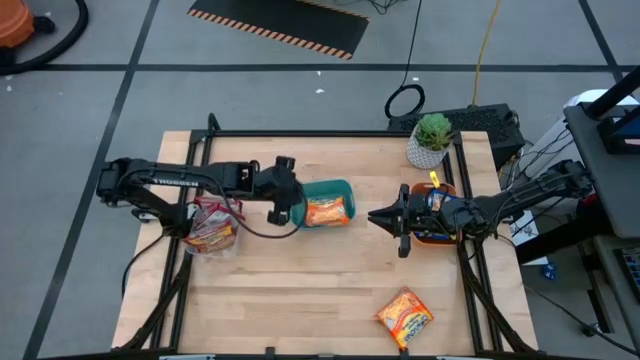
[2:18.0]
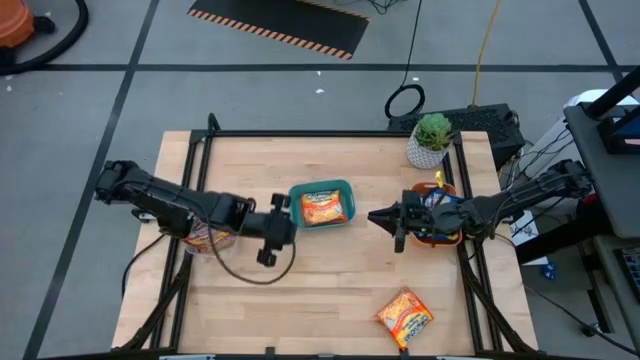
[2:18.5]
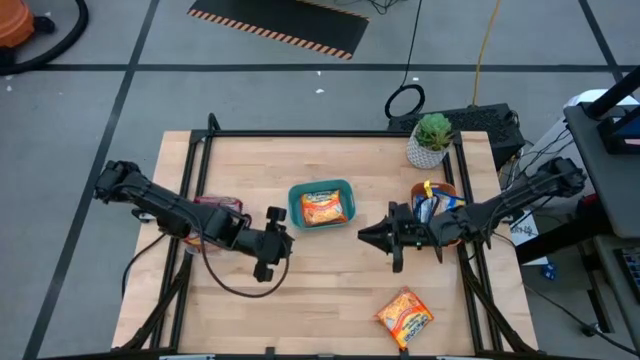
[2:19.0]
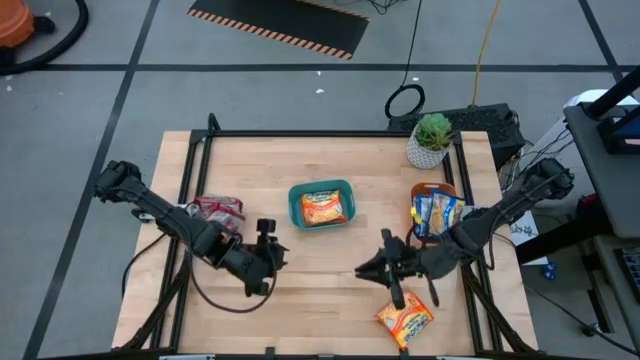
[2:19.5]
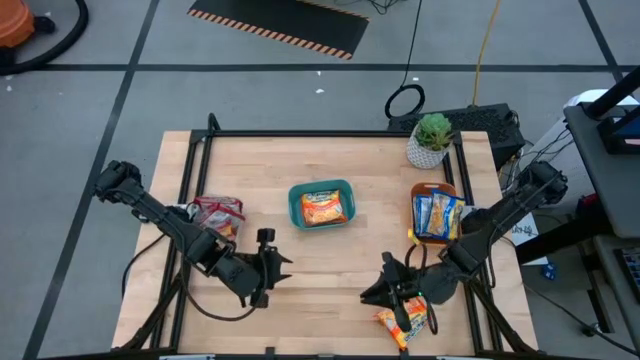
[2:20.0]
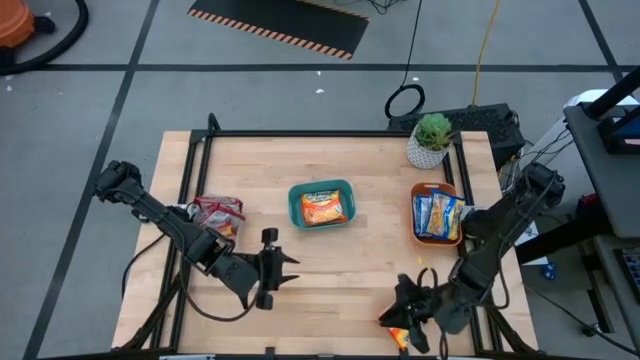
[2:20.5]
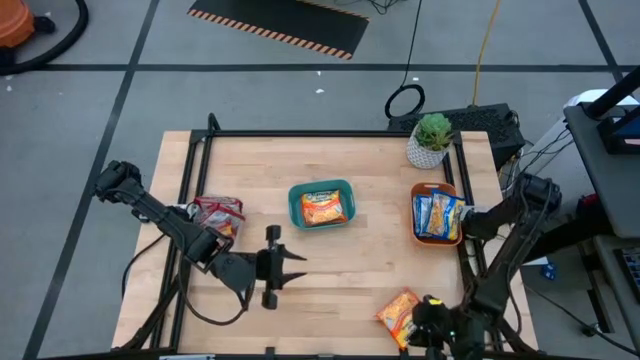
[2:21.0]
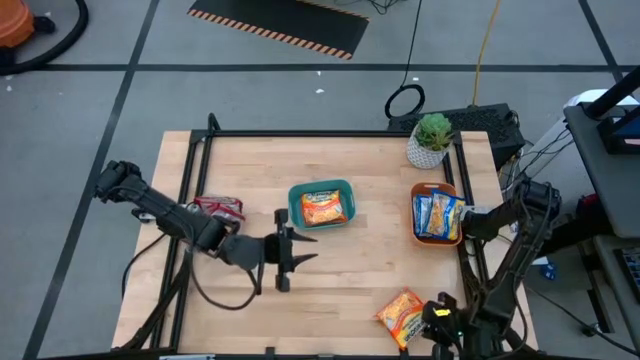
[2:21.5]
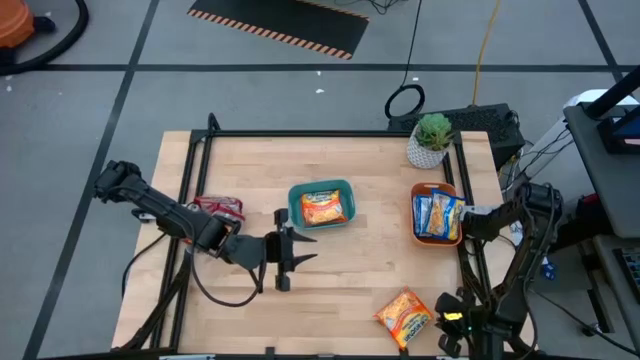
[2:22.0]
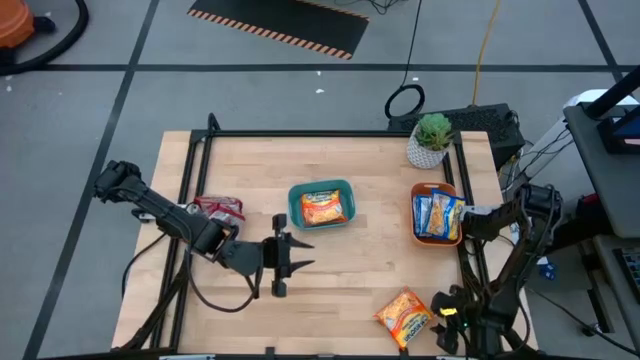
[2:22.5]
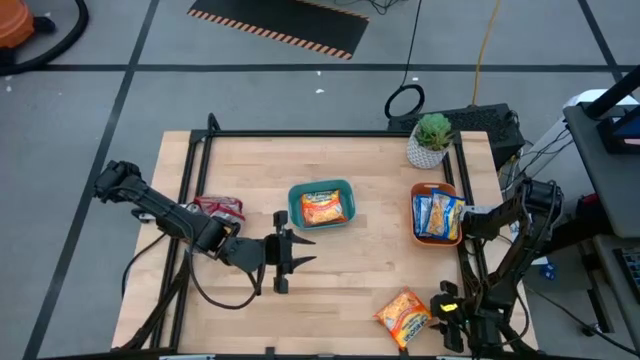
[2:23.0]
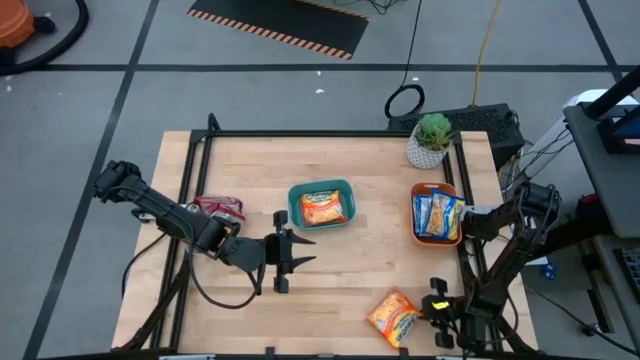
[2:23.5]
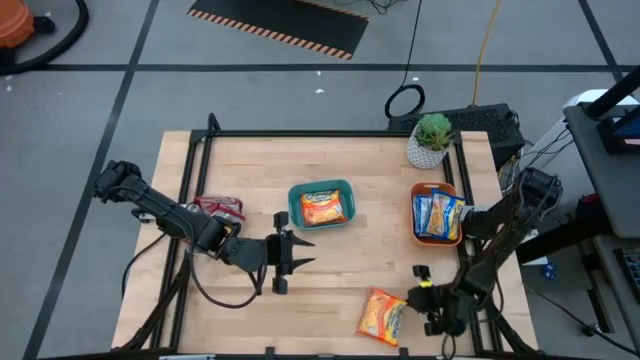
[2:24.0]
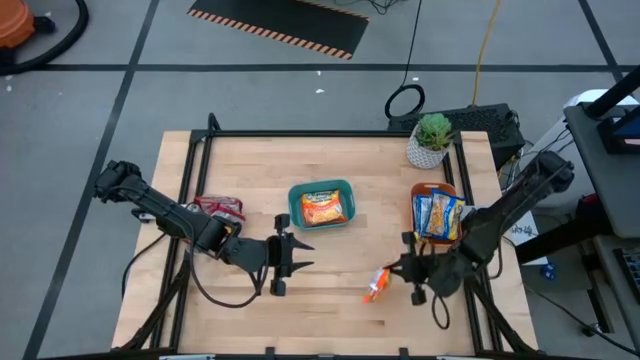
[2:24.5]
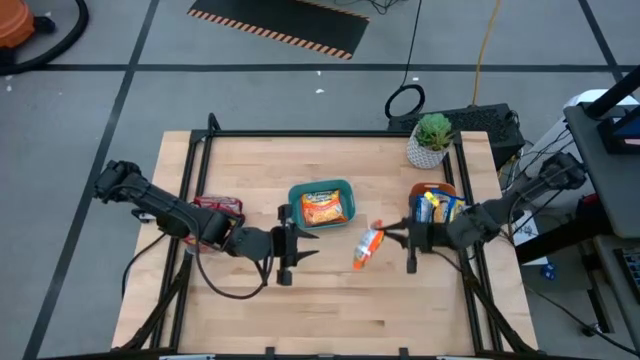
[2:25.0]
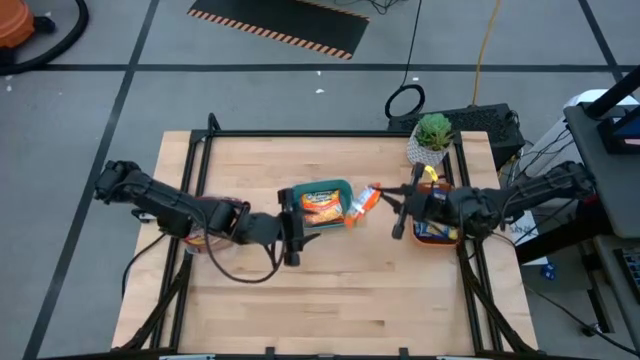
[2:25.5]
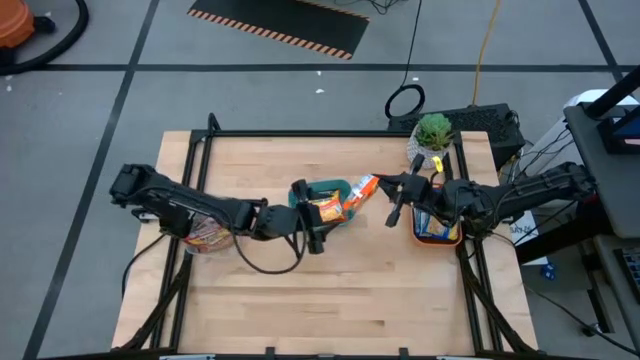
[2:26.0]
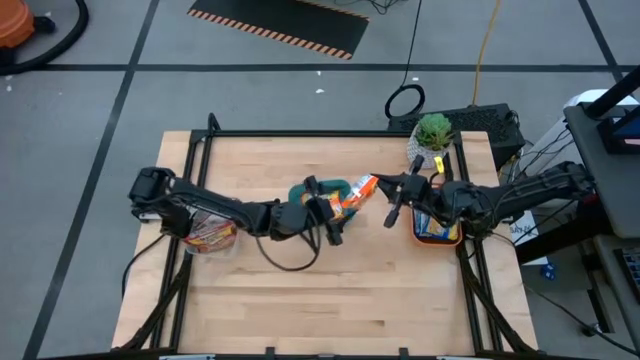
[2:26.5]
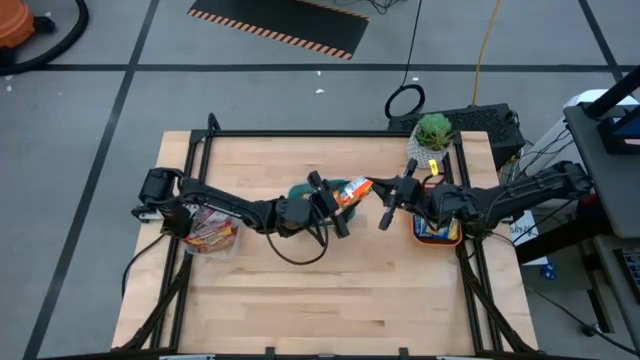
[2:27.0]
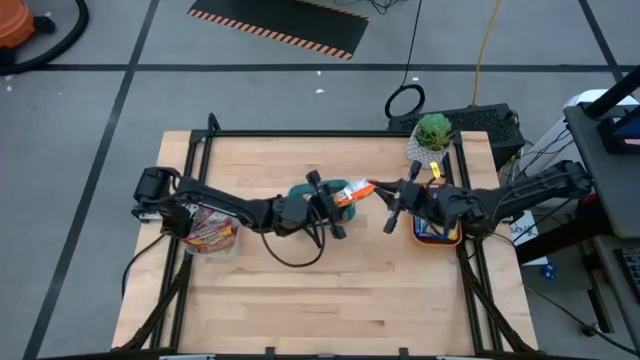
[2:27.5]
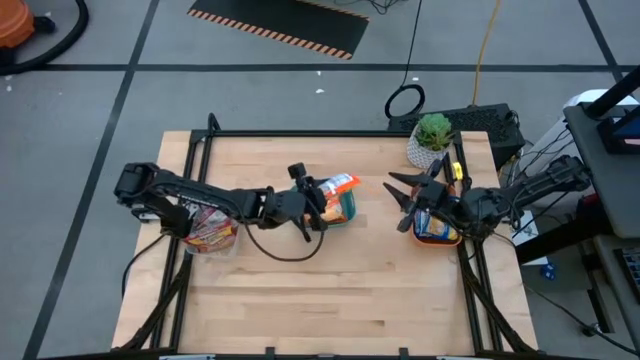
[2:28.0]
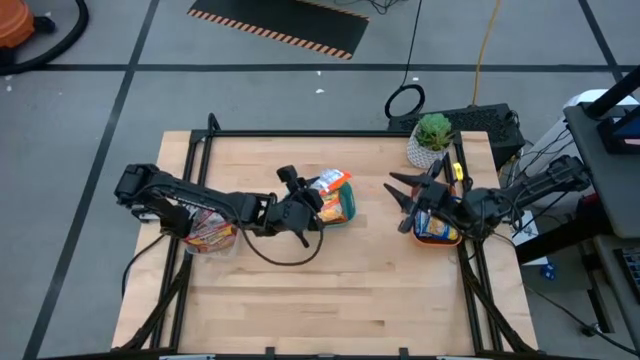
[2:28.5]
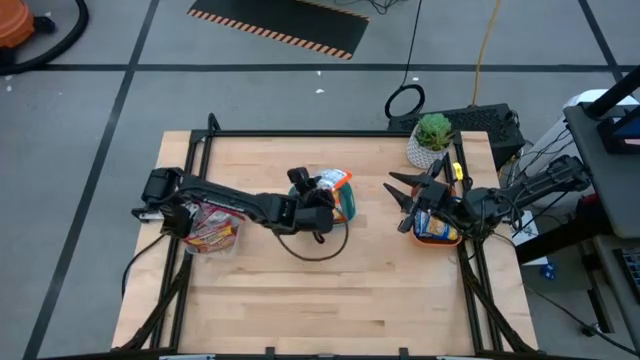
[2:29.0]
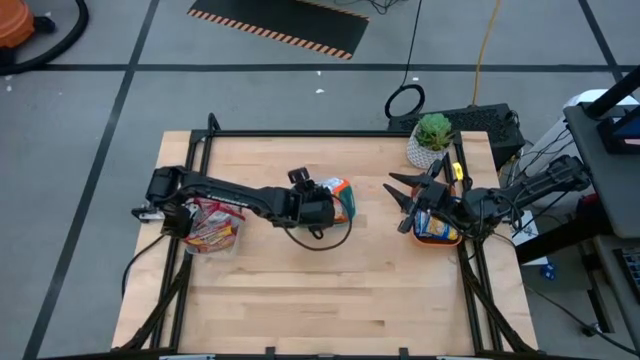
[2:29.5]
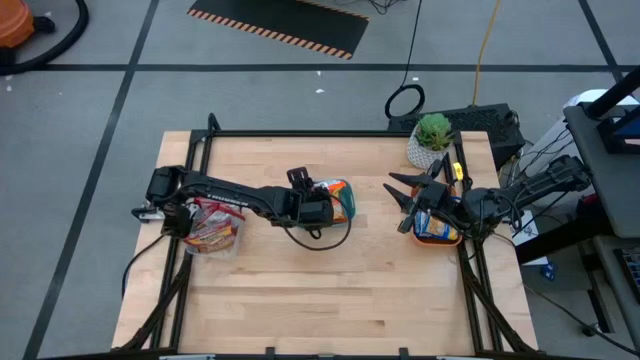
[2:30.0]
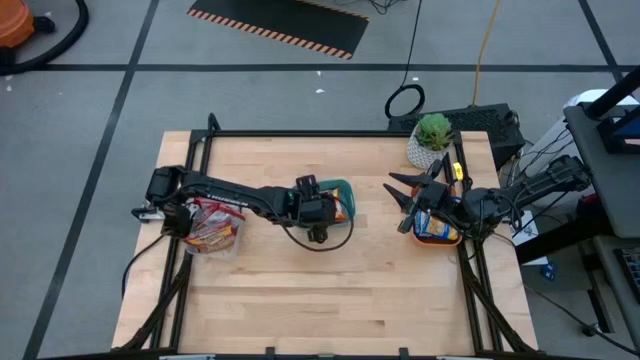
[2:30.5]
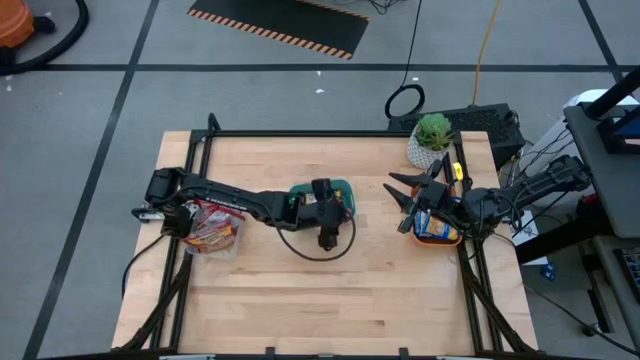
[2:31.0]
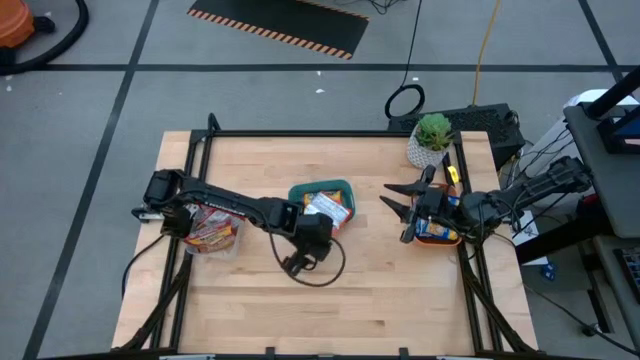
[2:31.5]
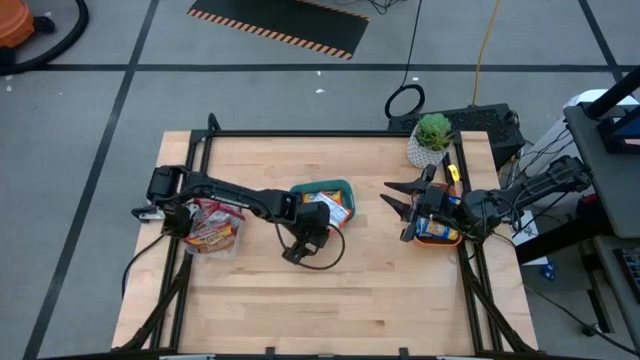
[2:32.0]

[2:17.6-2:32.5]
Task: Sort Maruchan noodles
Put the orange noodle pack into the green bin

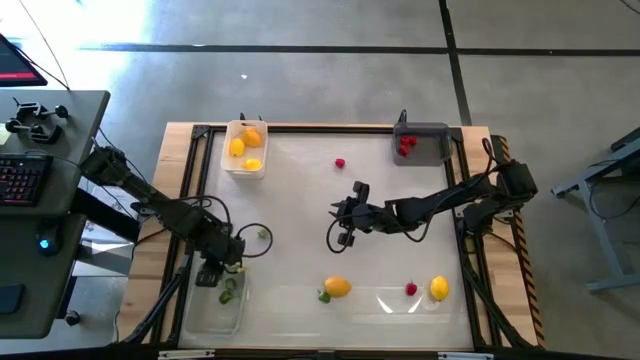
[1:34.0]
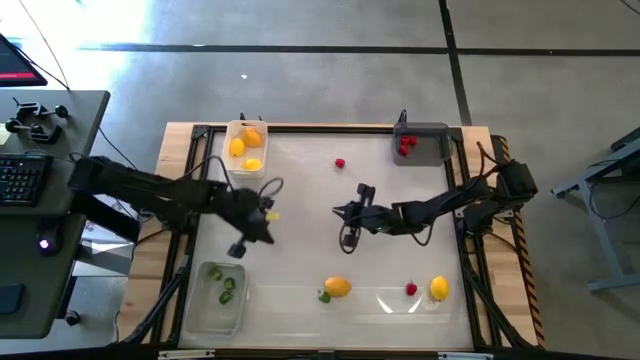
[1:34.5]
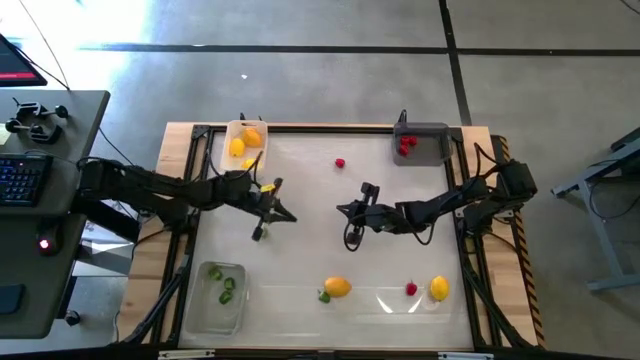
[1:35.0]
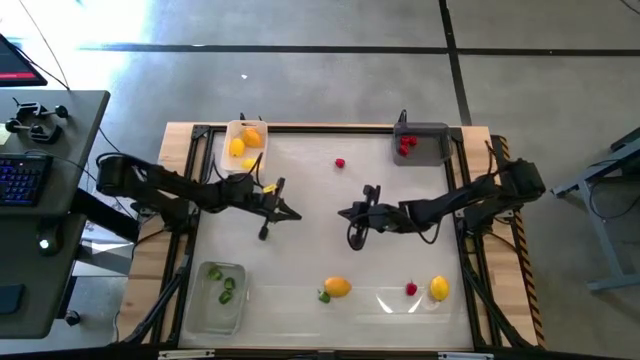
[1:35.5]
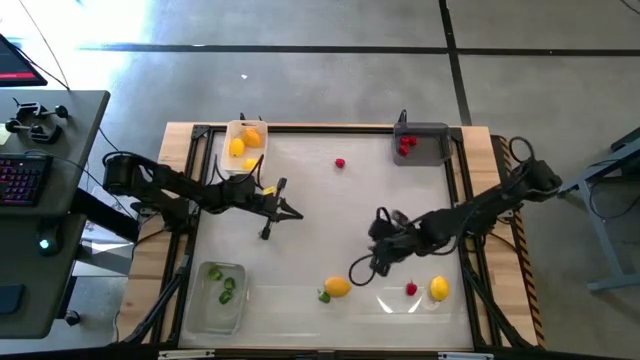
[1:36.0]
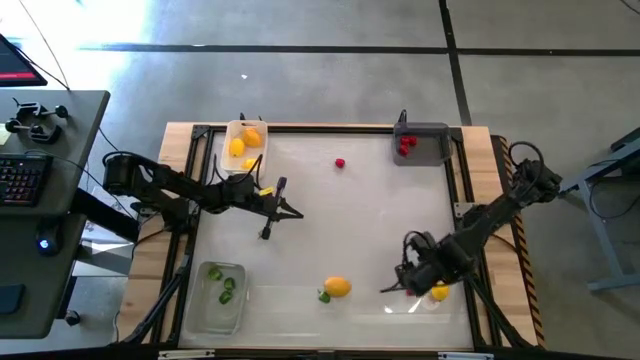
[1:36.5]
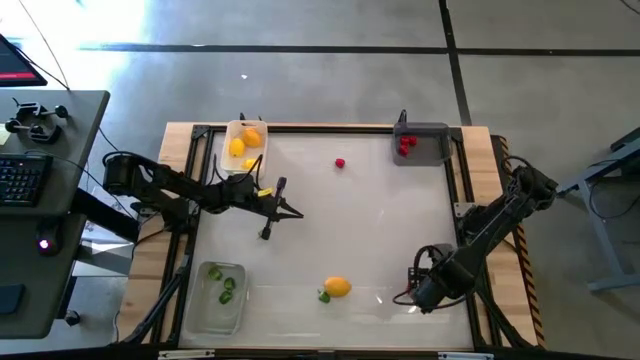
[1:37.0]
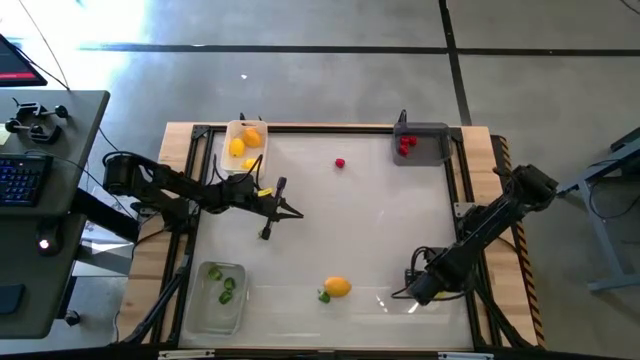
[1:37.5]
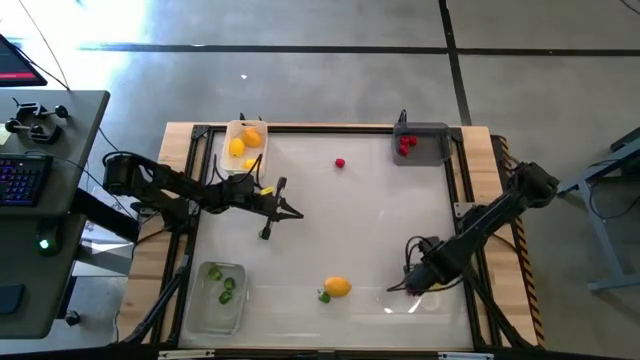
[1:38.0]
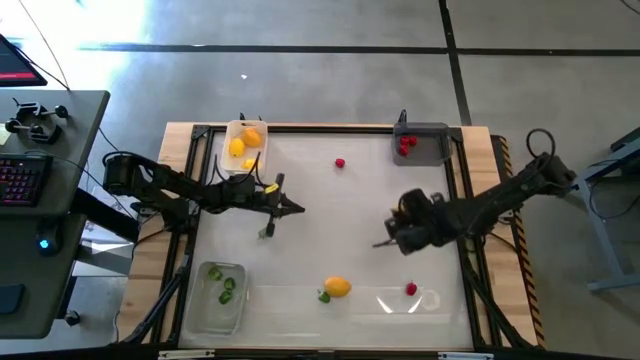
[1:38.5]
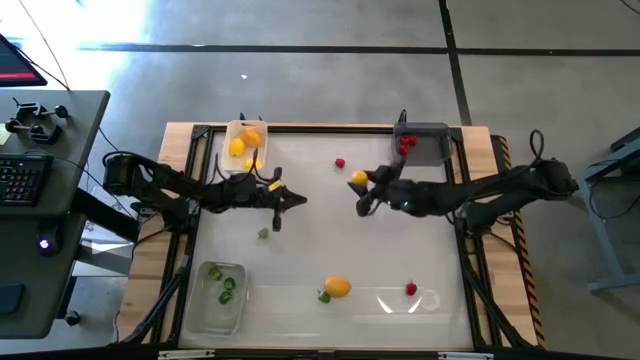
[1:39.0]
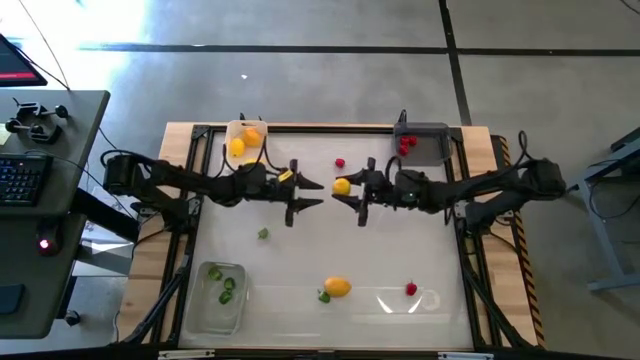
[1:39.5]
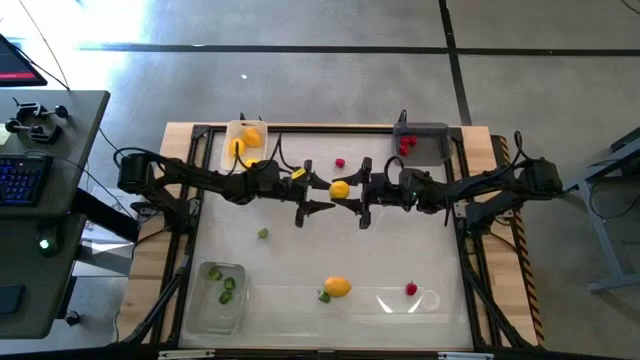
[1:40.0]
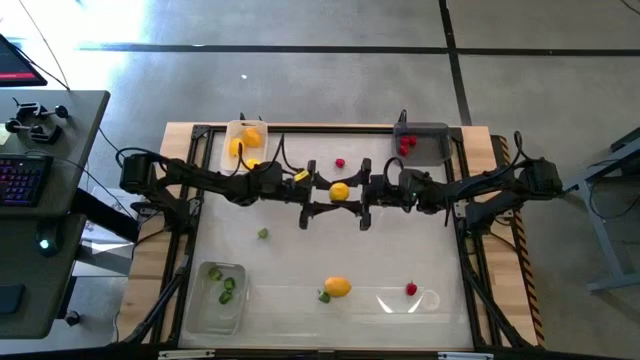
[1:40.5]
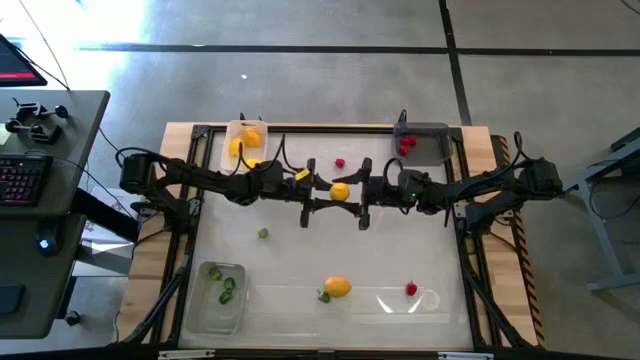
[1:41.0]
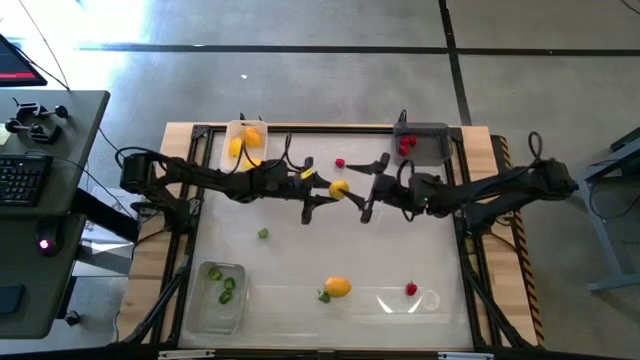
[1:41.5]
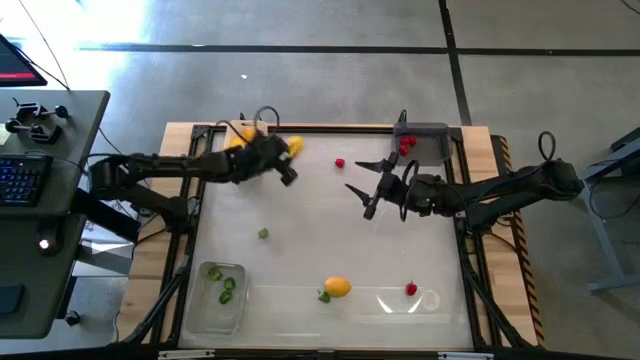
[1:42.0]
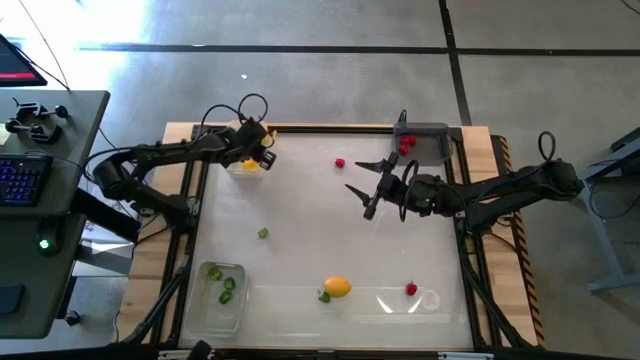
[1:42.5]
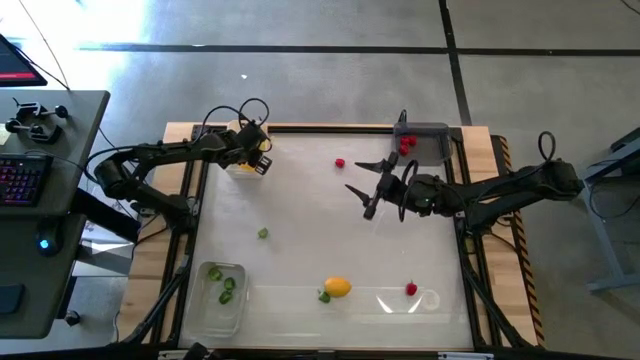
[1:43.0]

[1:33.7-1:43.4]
Task: Sort produce into baskets
Put the lemon into the white bin
